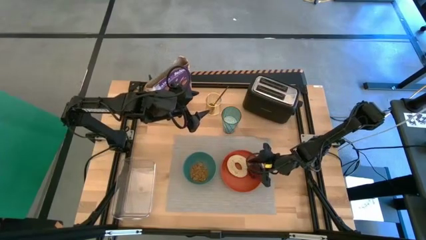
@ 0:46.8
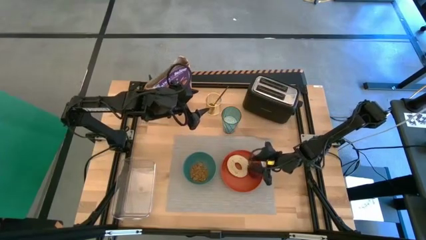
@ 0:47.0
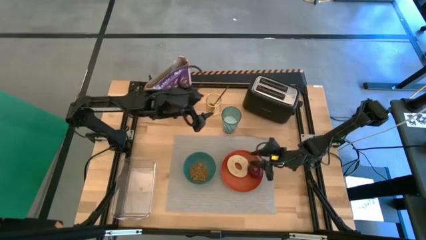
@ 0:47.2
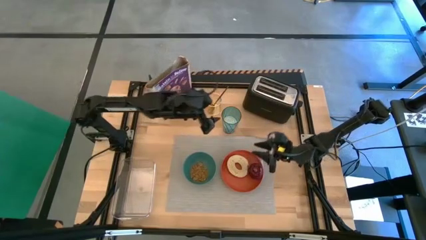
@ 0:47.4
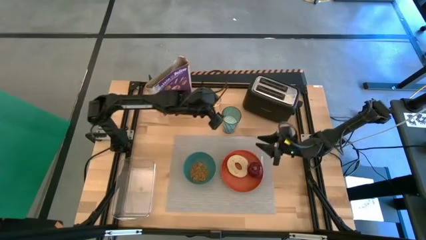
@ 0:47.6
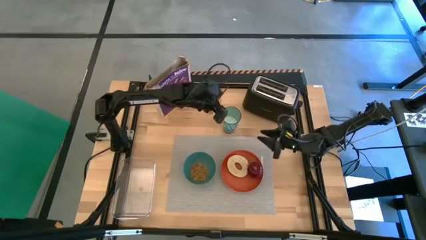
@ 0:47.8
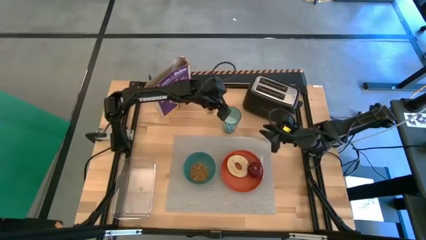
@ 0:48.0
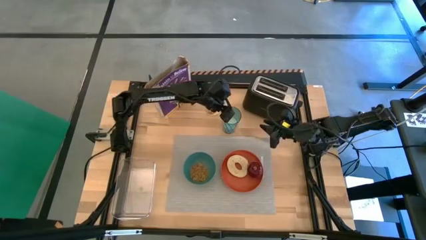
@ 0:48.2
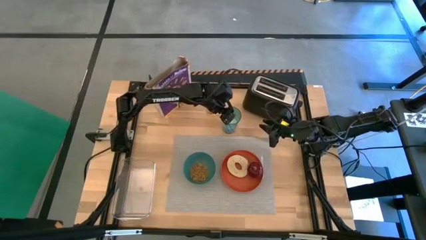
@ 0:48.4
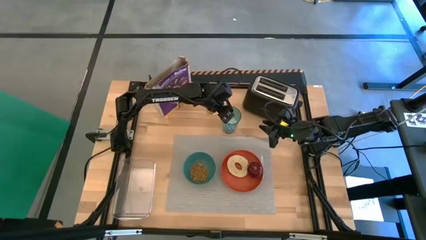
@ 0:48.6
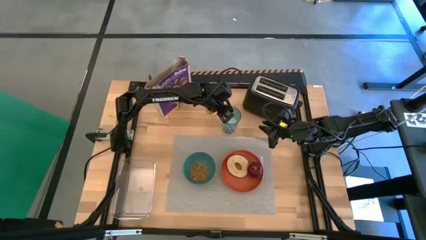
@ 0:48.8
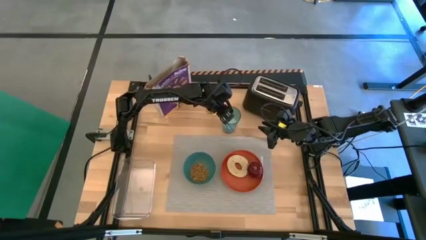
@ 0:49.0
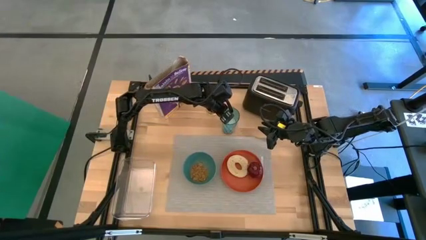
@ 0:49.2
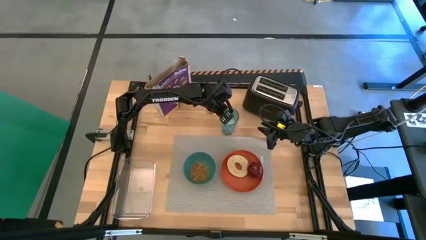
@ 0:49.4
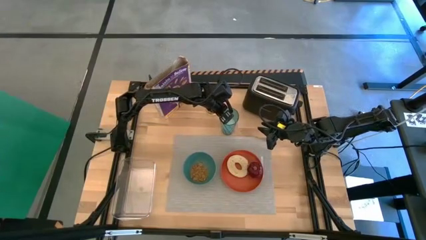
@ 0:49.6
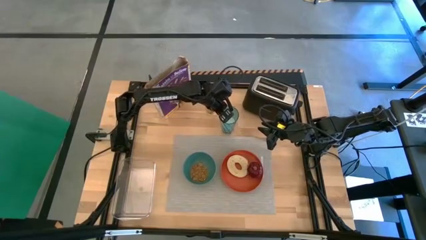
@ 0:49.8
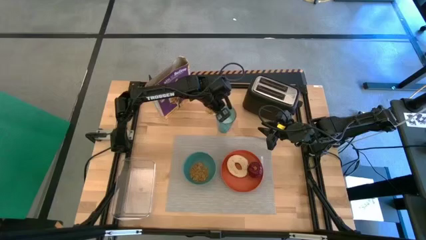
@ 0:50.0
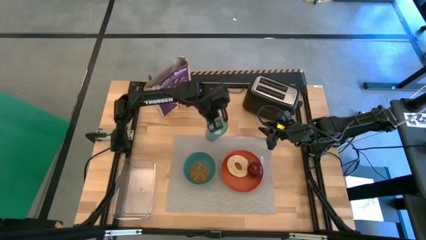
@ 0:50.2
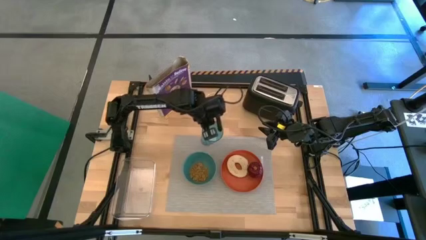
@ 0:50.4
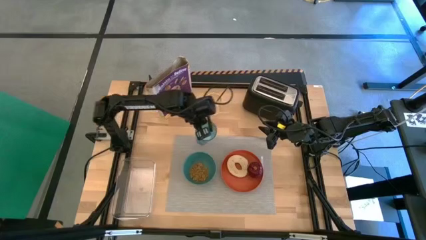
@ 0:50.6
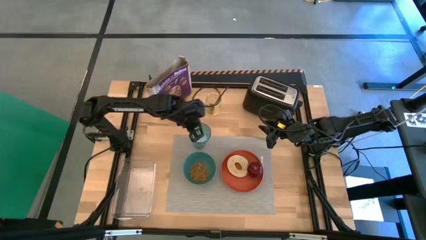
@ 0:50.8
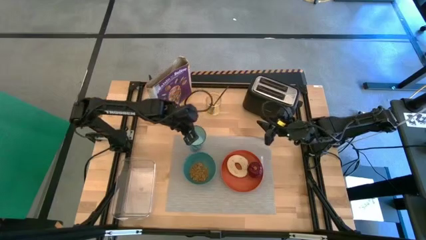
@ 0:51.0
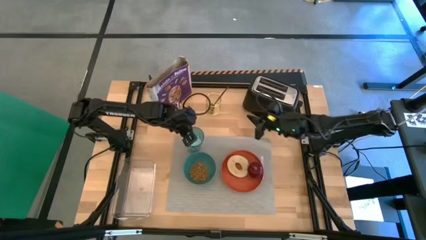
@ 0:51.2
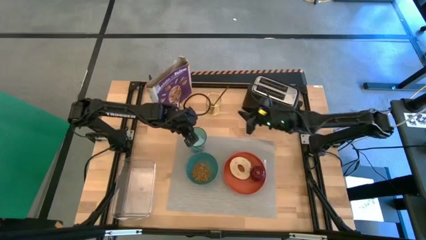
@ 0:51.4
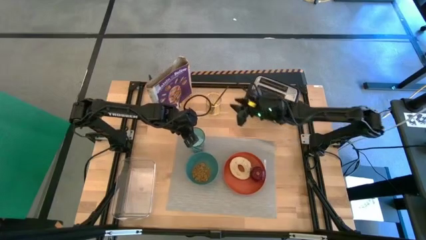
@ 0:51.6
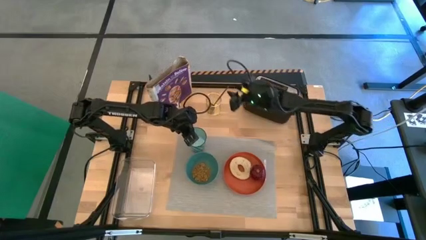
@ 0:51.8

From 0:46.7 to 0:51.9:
Task: Arrange a breakfast setting
Put the blue cup on the gray table mat

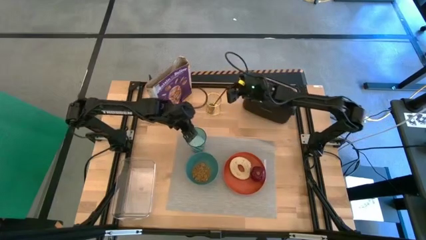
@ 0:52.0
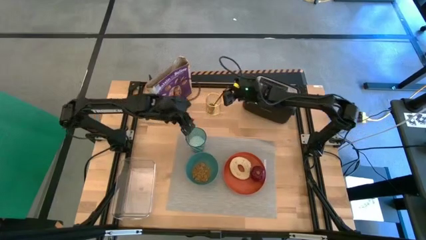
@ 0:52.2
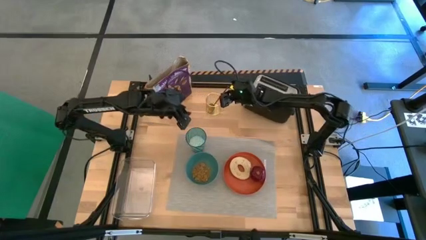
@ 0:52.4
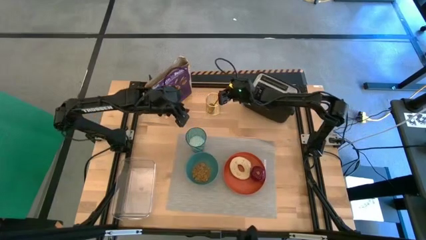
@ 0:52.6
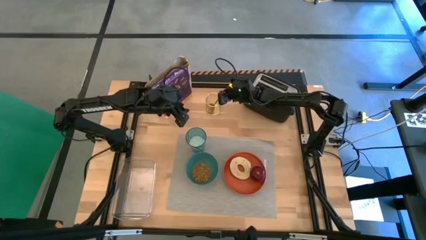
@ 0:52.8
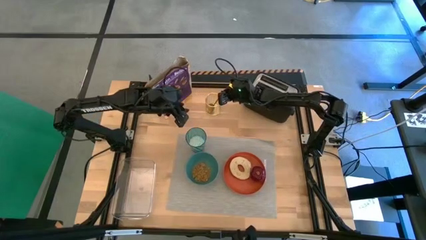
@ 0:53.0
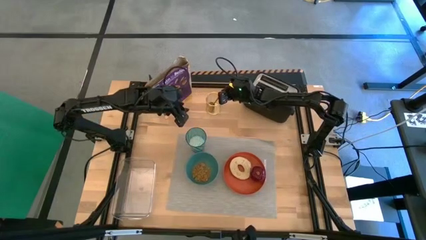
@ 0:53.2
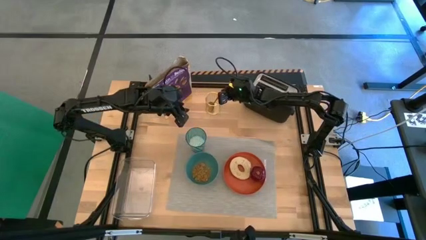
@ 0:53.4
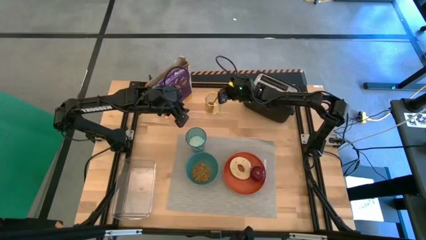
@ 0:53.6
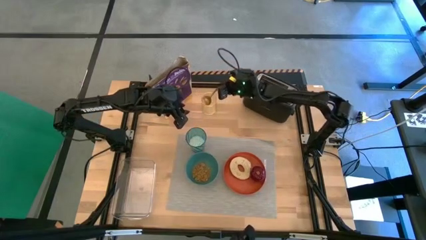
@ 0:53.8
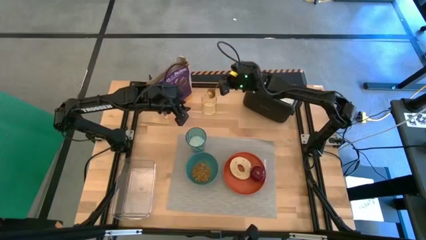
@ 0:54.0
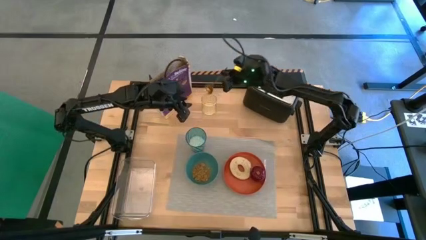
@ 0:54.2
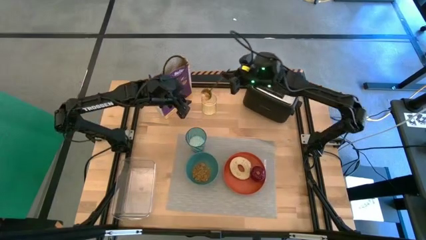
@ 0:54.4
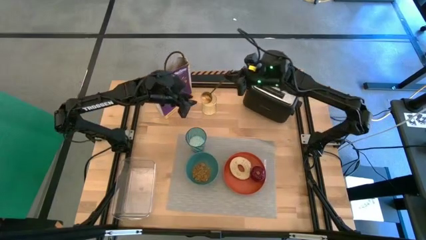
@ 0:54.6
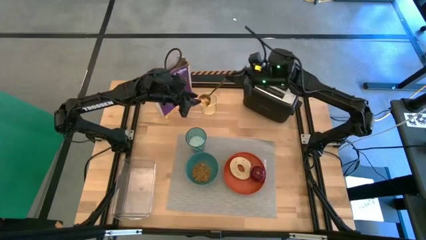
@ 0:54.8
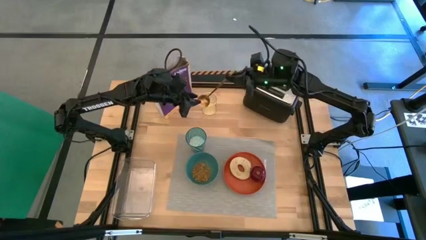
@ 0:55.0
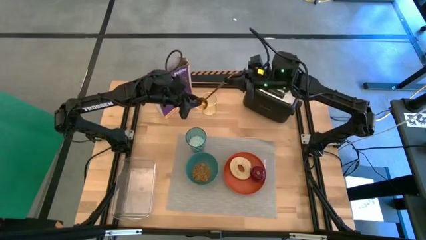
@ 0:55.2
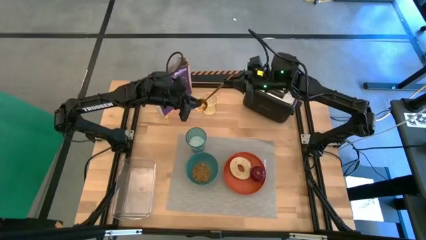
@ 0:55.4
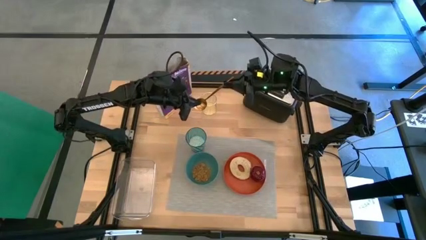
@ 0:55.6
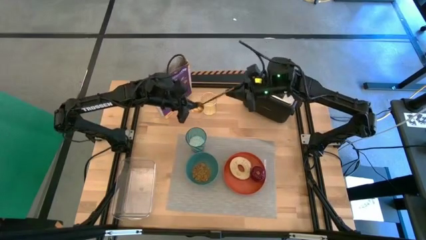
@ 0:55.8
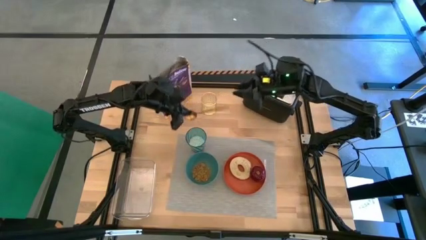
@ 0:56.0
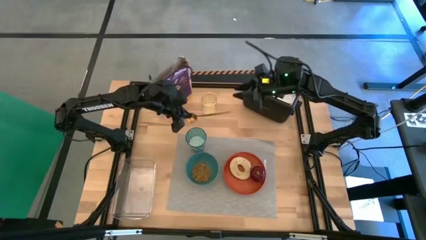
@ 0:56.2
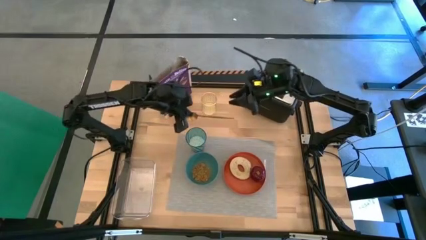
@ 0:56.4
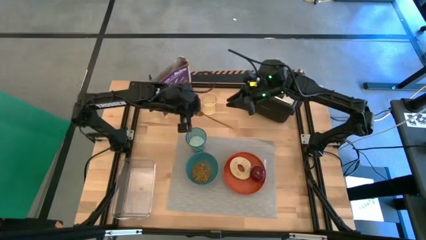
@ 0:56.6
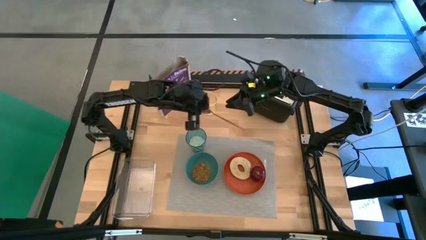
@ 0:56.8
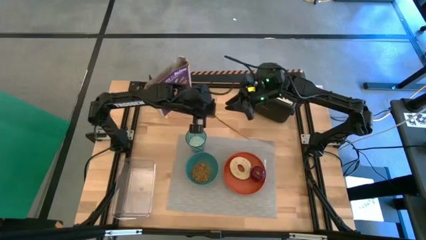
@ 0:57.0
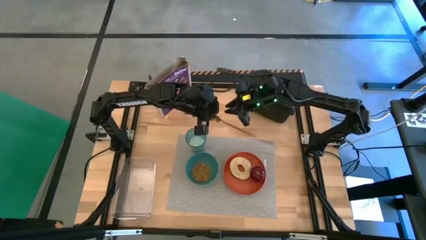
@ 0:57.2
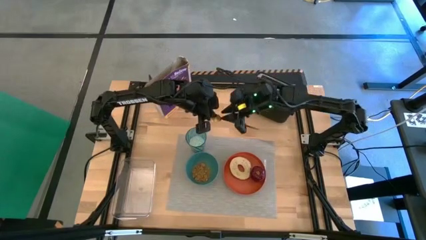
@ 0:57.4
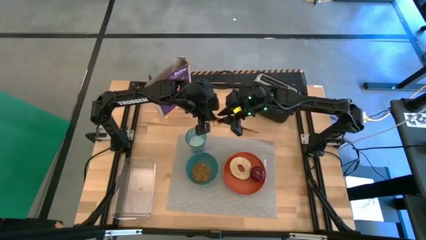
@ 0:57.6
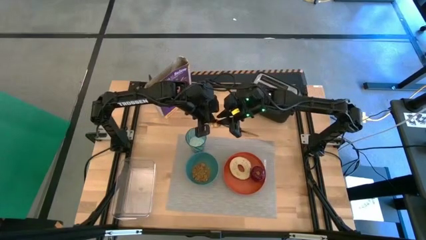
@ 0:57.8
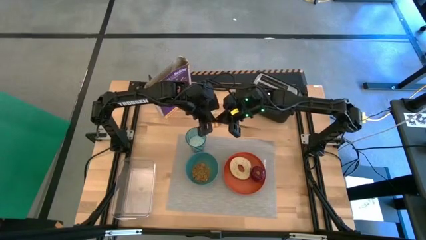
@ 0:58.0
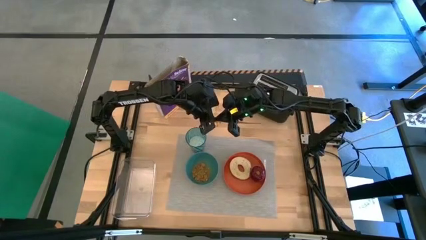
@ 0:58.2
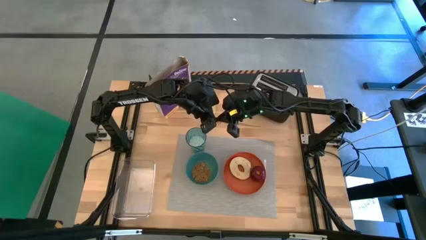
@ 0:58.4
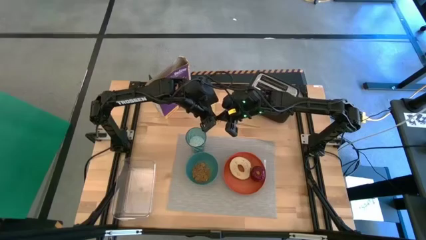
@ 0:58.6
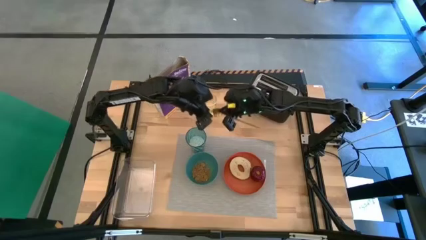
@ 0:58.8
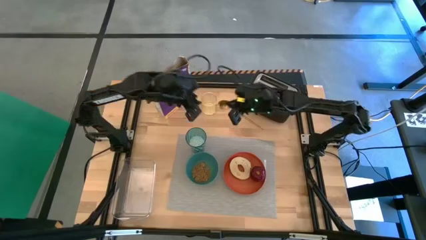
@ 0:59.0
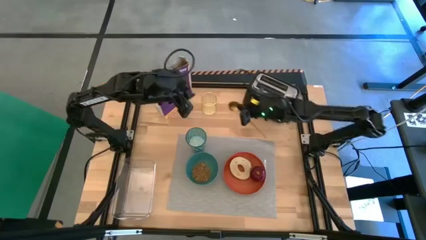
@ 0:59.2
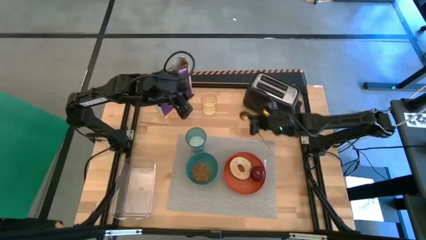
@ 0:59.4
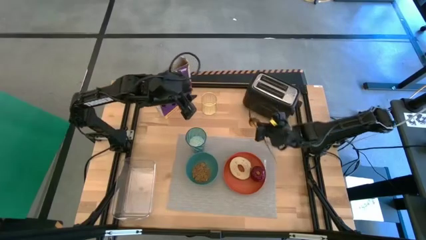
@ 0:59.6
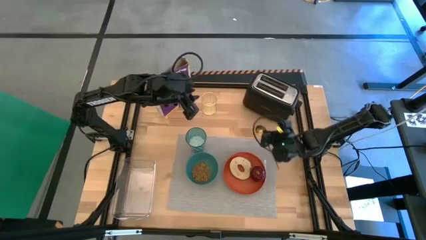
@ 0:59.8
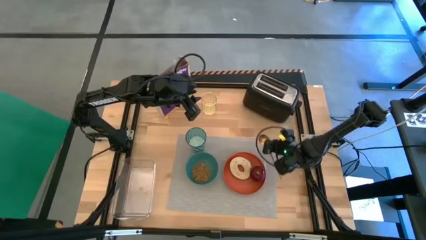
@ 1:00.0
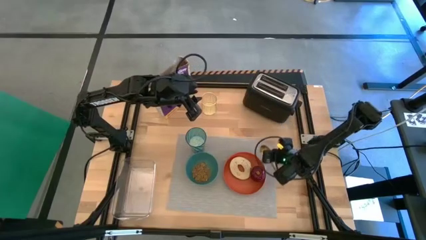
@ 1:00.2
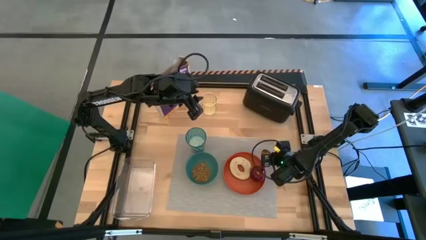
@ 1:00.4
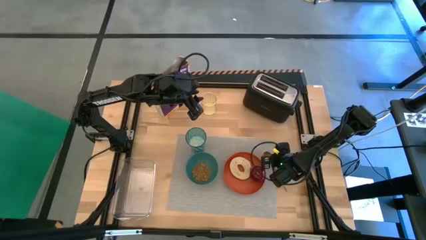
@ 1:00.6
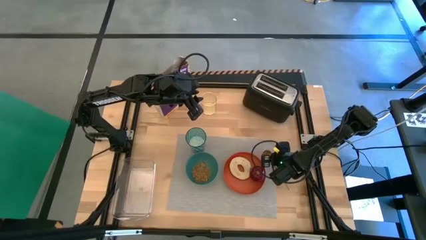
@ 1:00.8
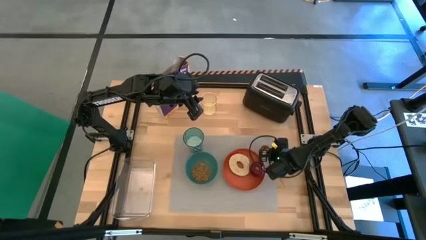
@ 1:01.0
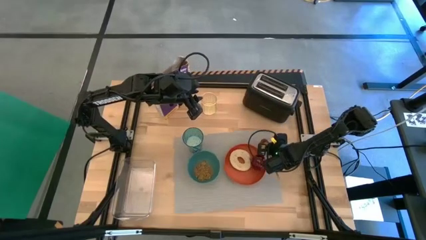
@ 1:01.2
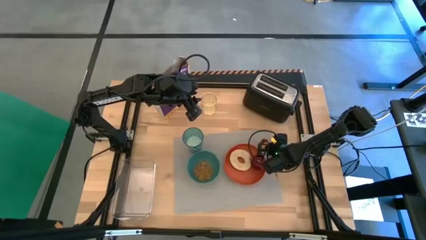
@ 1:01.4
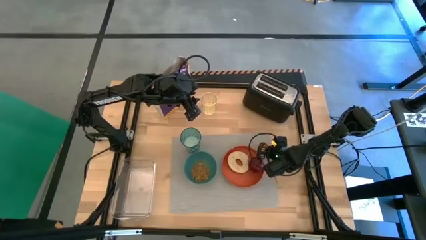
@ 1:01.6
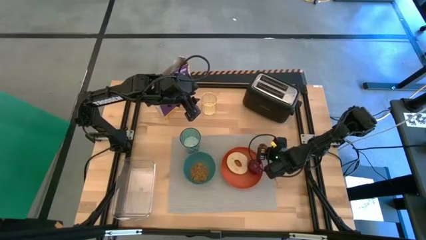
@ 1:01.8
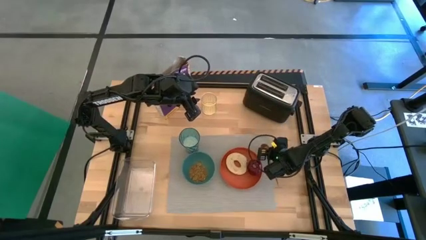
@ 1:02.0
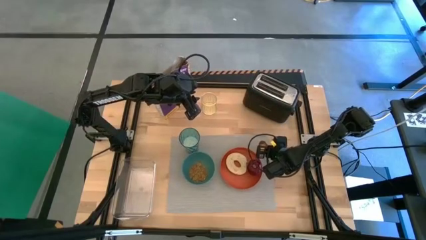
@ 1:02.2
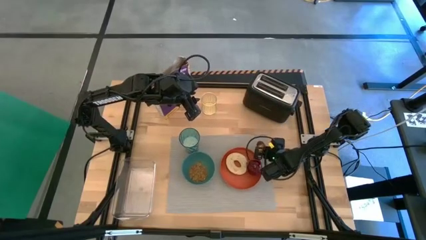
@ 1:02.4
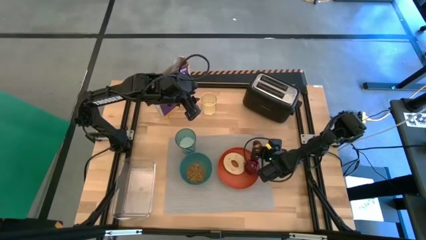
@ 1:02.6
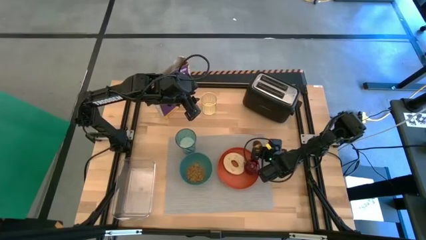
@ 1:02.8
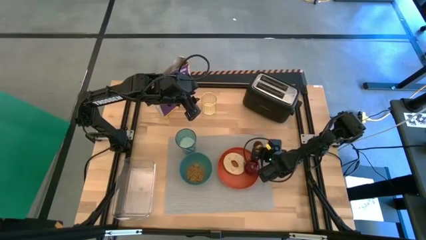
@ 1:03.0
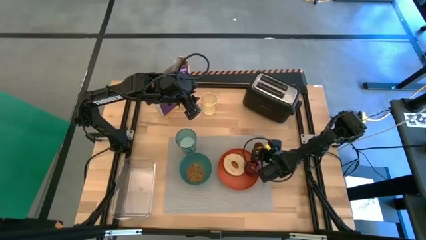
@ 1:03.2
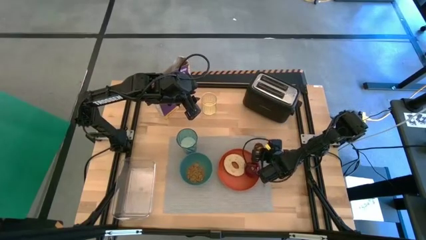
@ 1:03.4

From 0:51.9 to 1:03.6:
Put the gold spoon to the right side of the orange plate on the gray table mat
